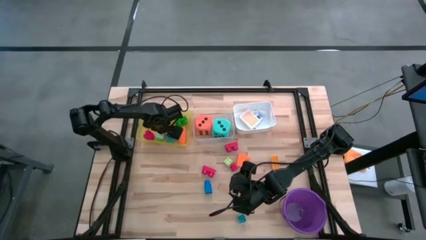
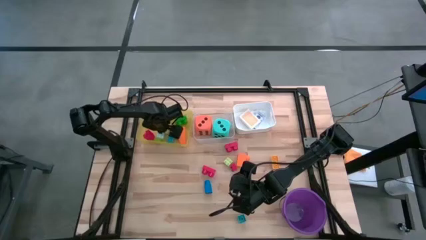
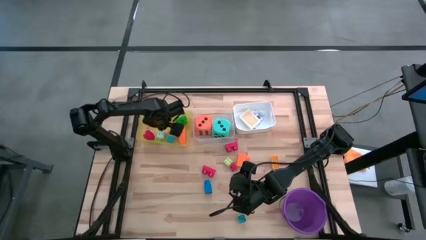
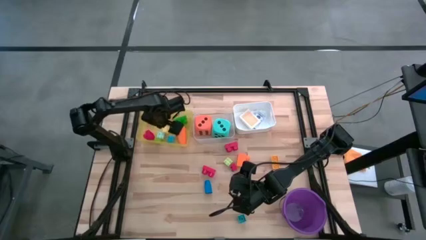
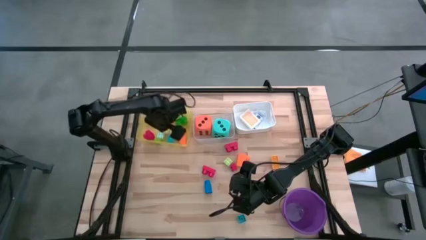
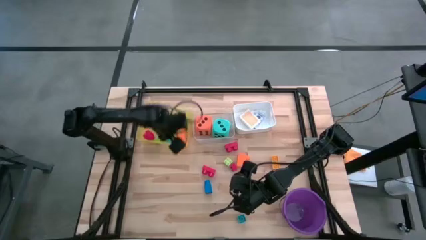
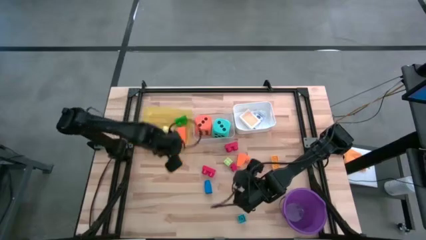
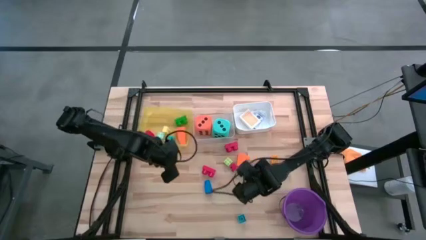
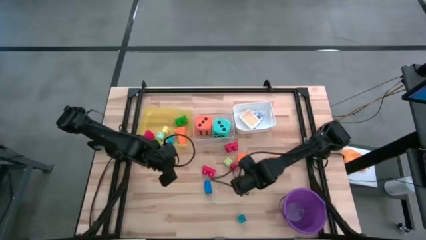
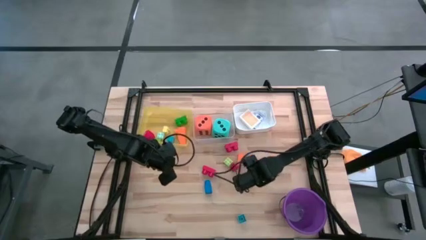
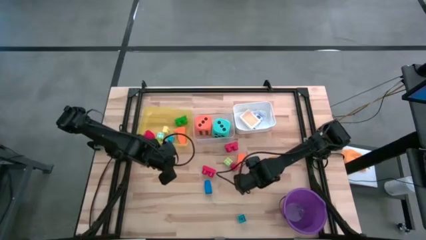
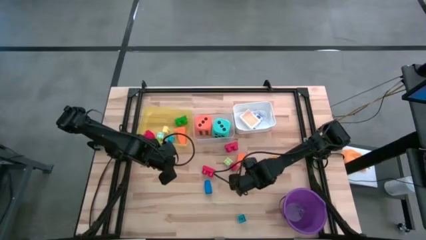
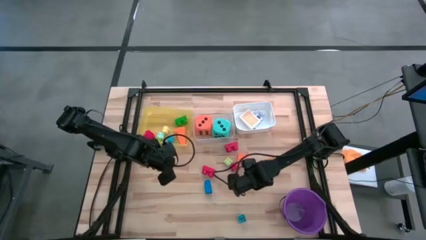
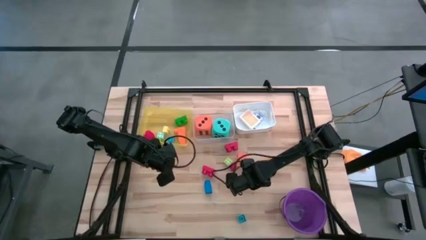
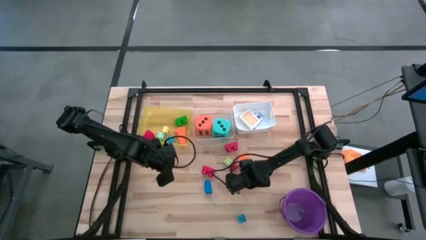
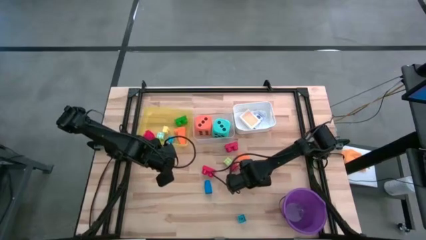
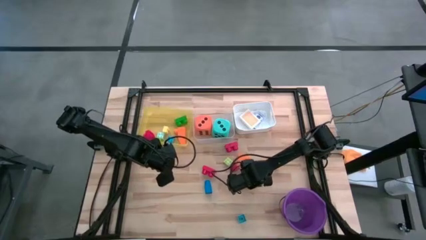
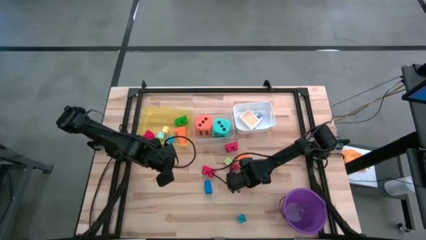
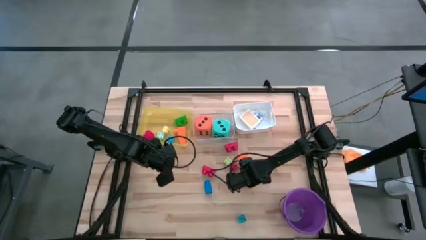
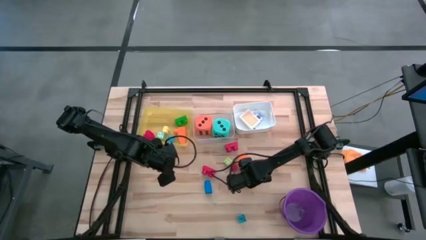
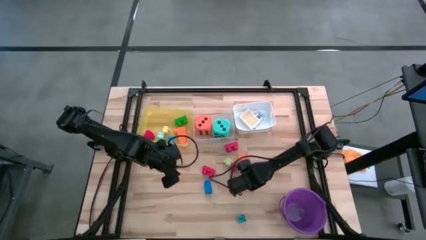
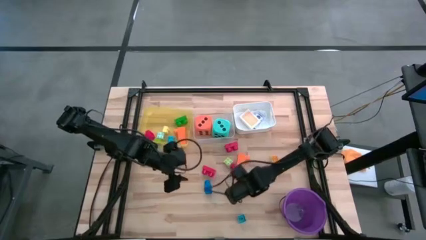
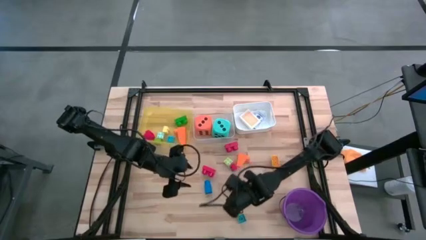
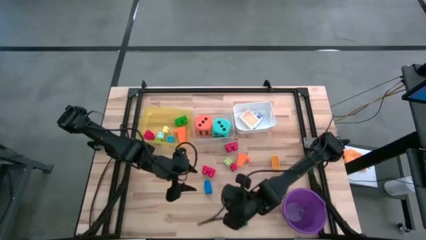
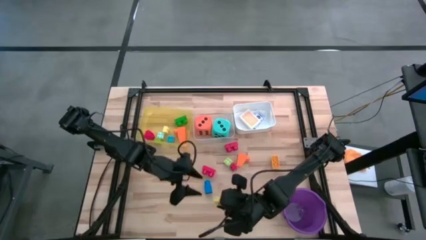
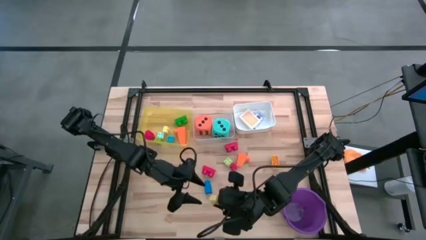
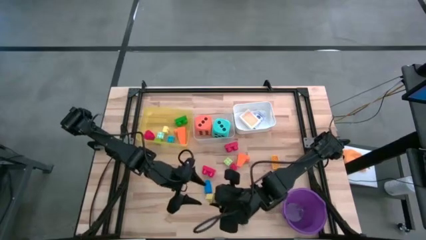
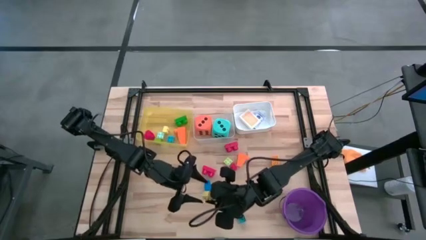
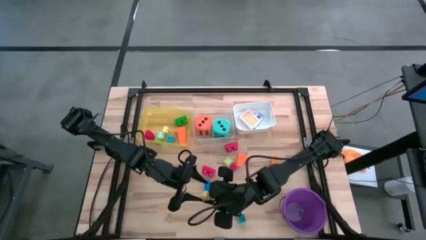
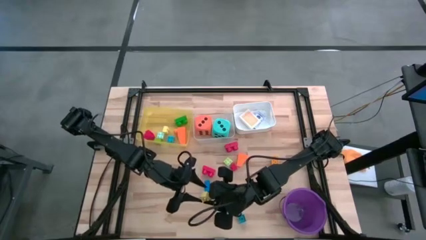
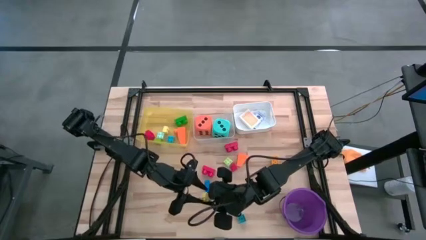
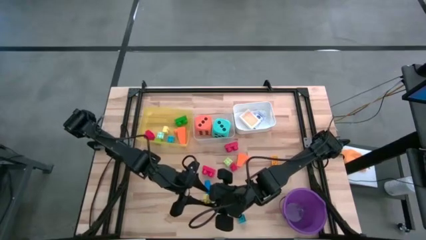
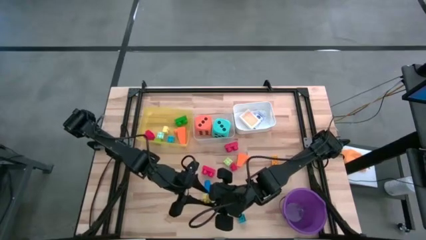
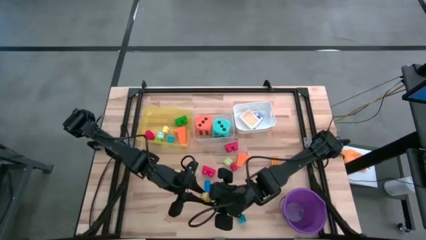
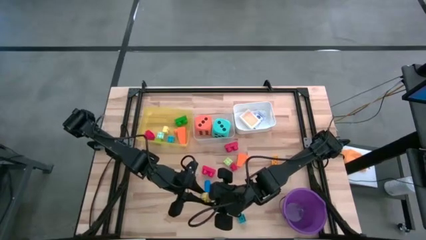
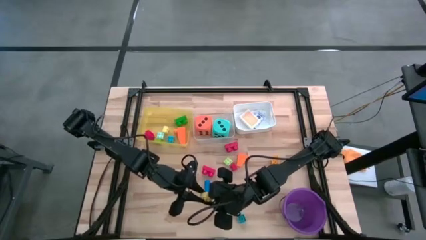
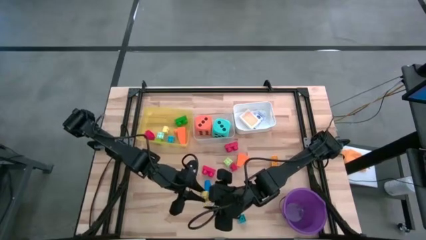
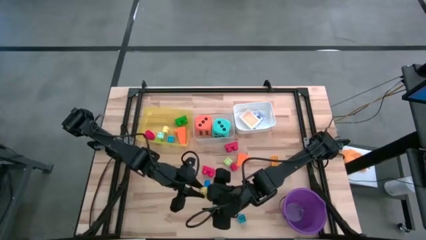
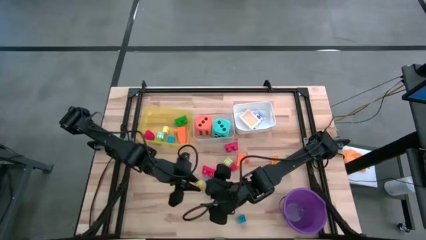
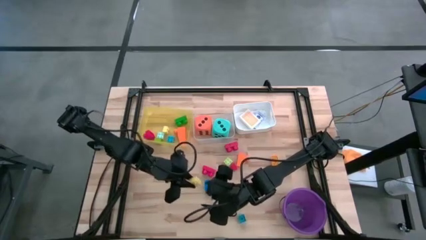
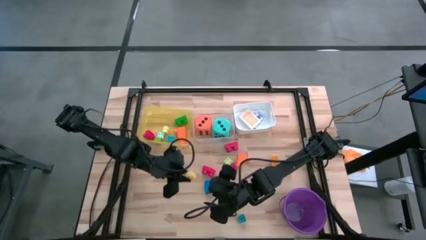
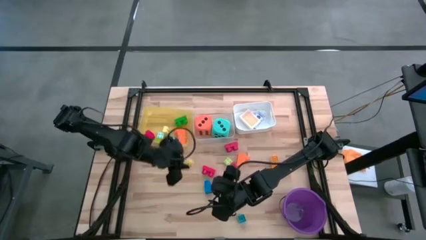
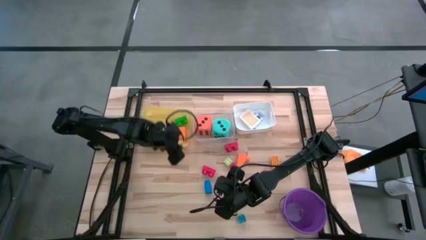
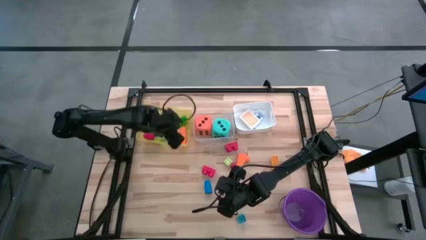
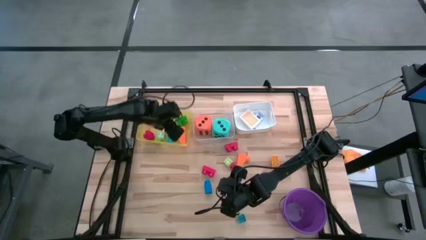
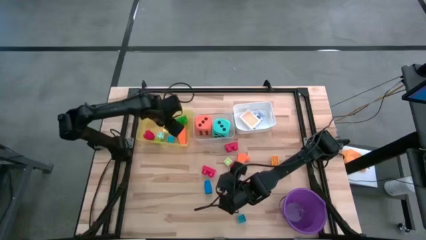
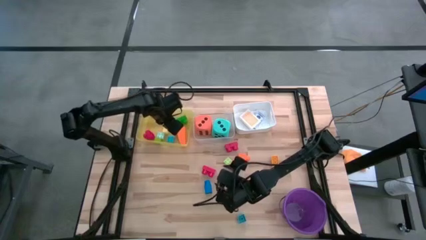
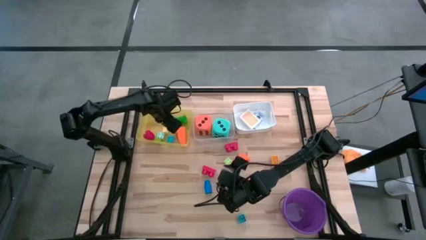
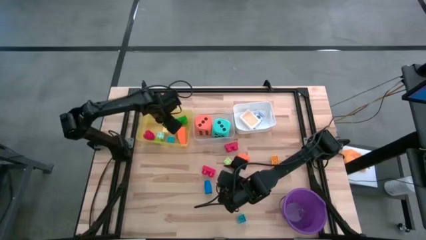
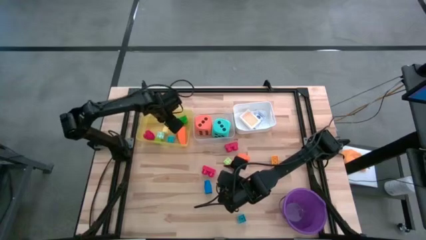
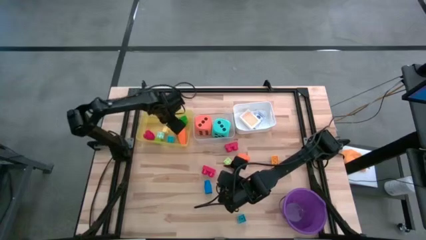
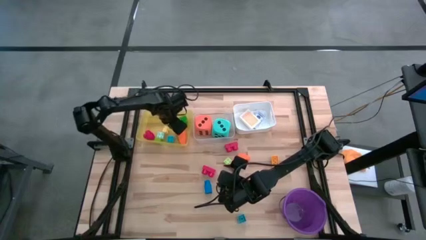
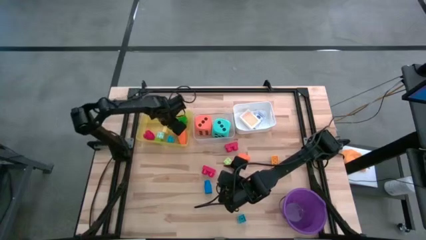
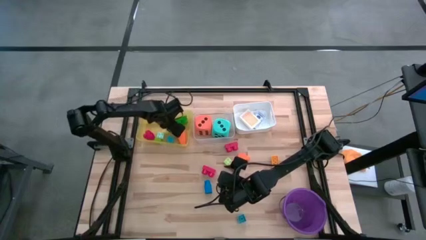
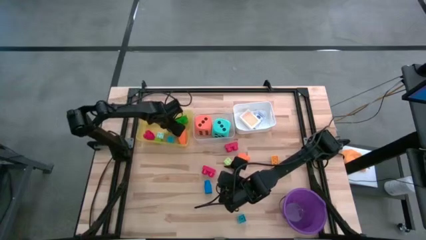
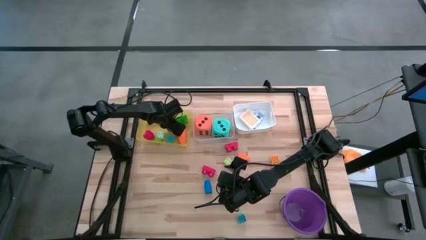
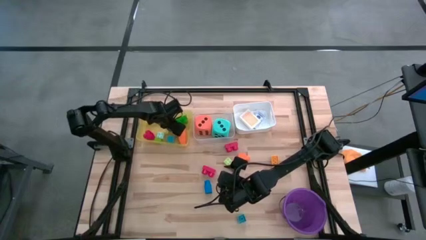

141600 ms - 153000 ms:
Task: Pick & Place Toys
Put the yellow game piece into the yellow bin

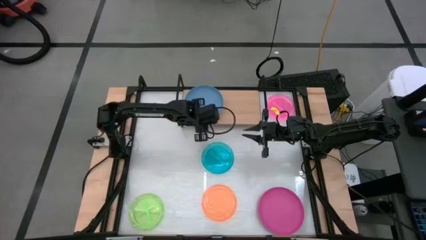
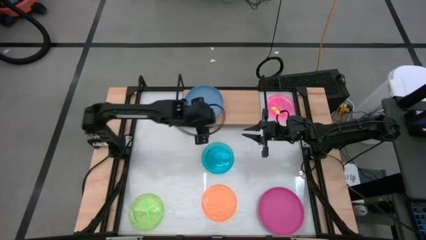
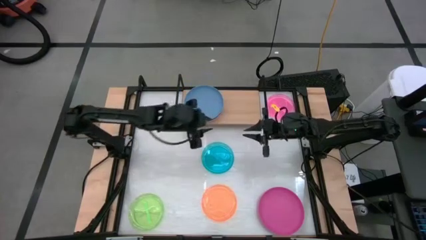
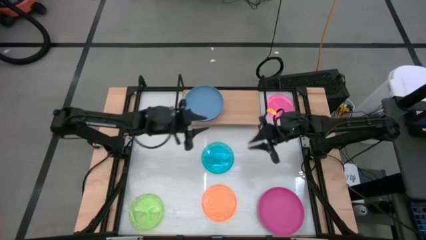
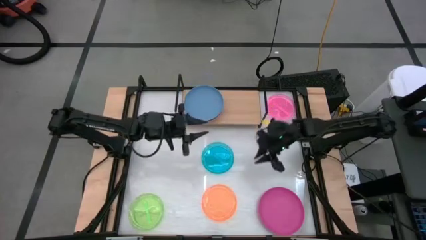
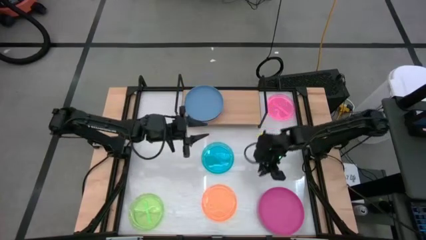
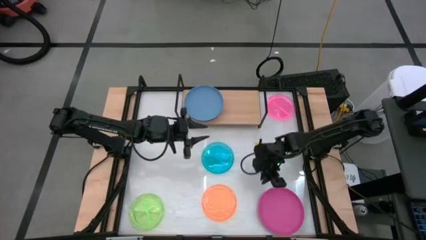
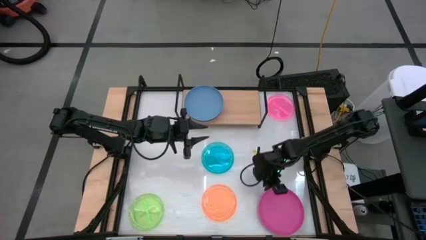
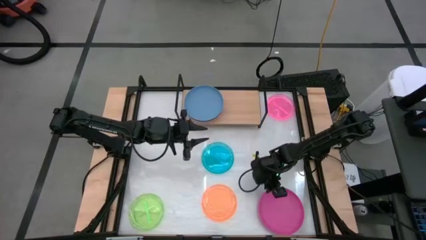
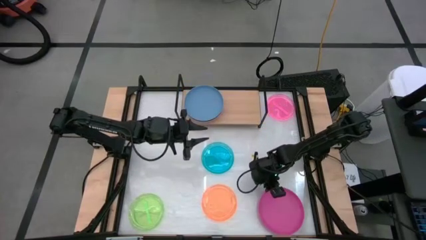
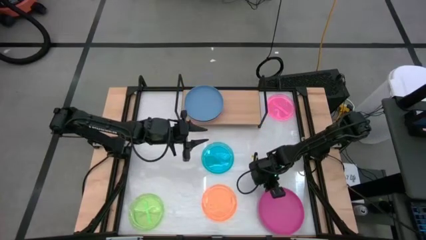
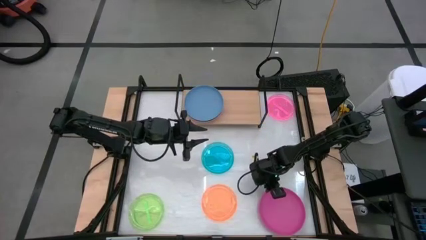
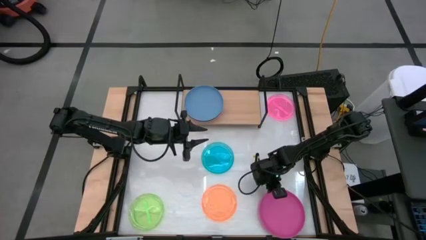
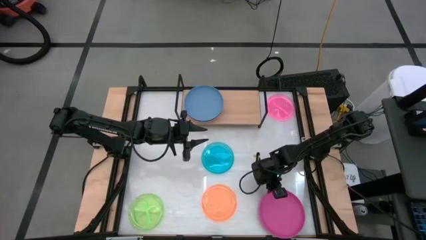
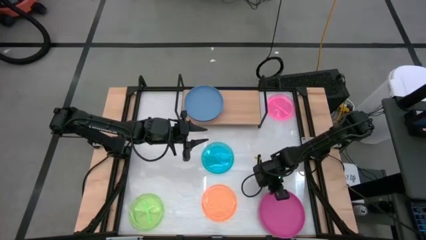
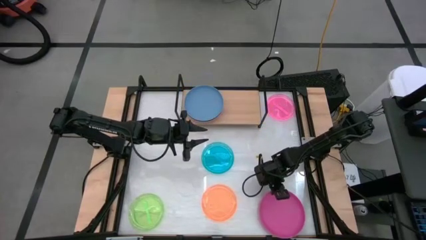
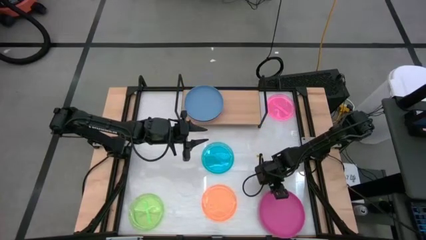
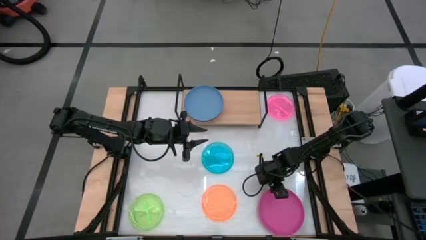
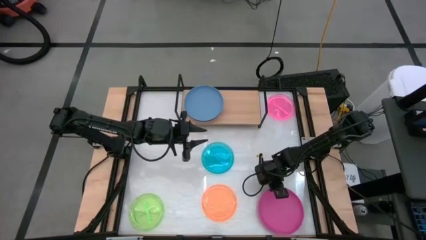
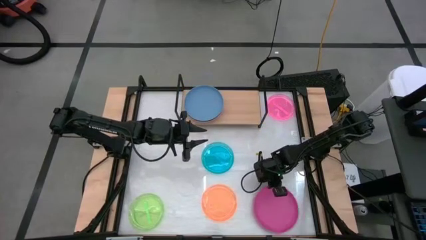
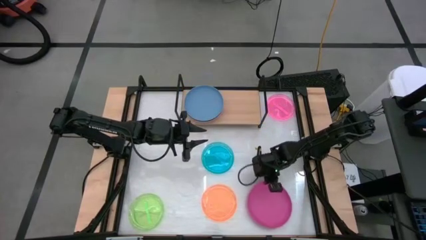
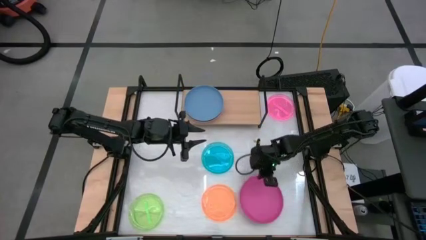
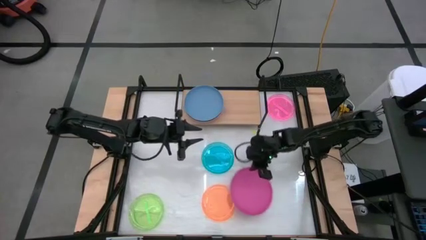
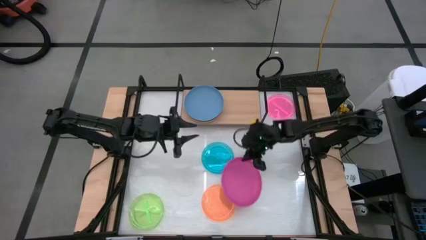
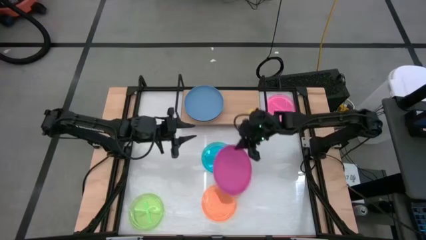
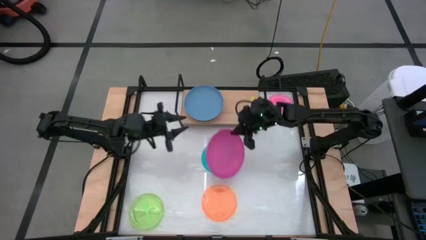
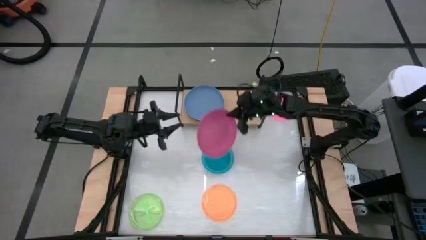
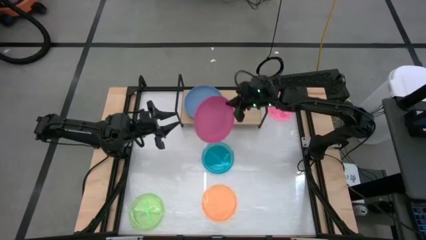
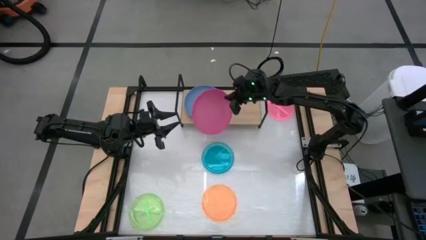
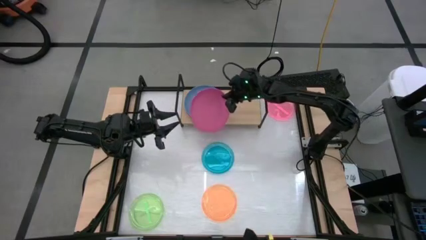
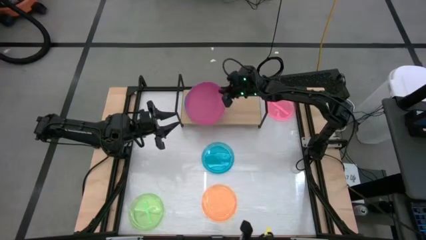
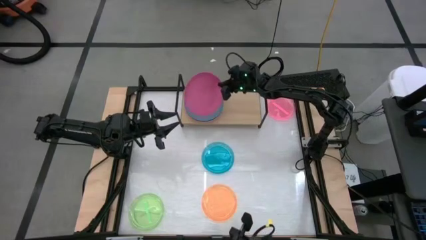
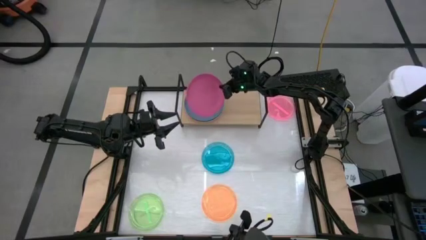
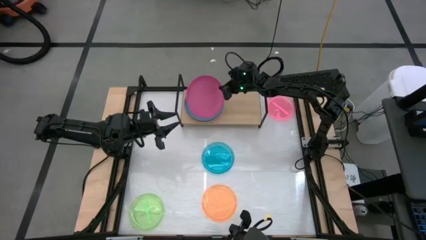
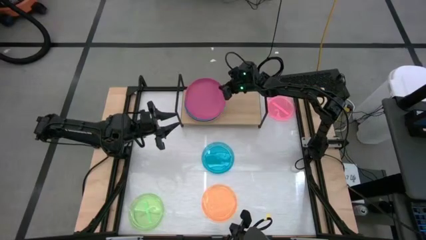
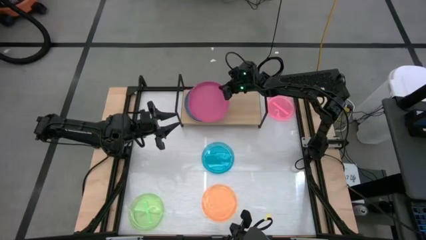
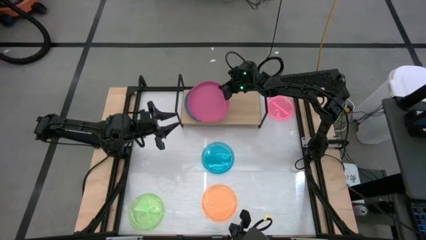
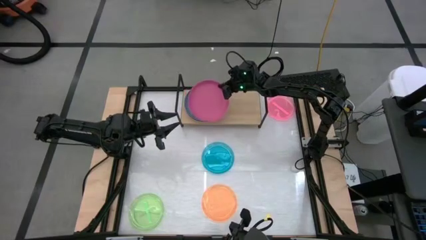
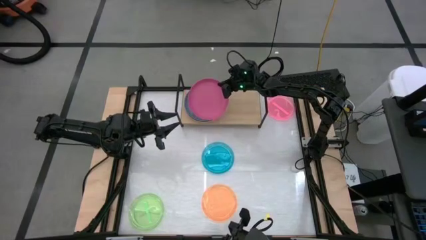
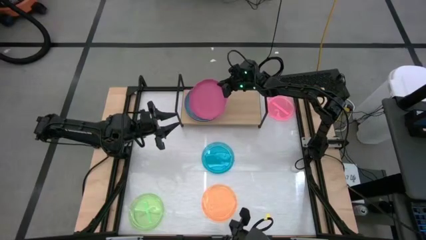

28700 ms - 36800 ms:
Task: Place and stack plates onto a shelf
Stack the pink plate on top of the blue plate on the shelf
